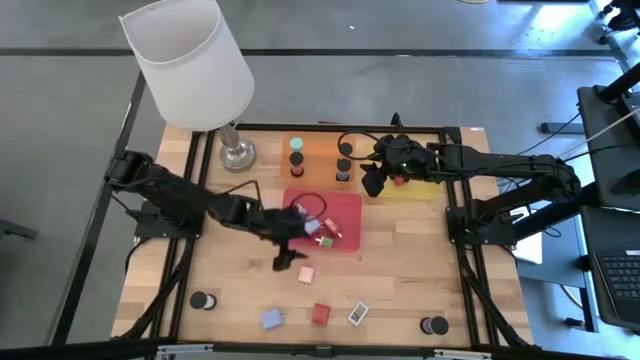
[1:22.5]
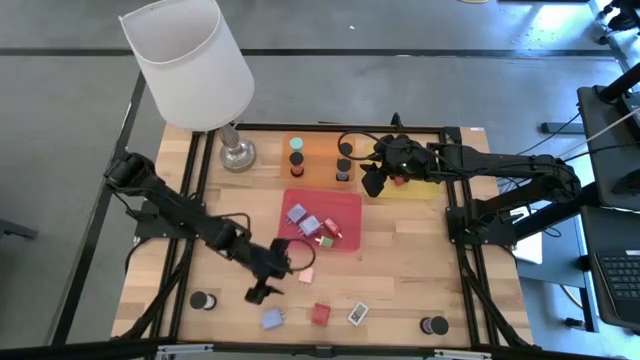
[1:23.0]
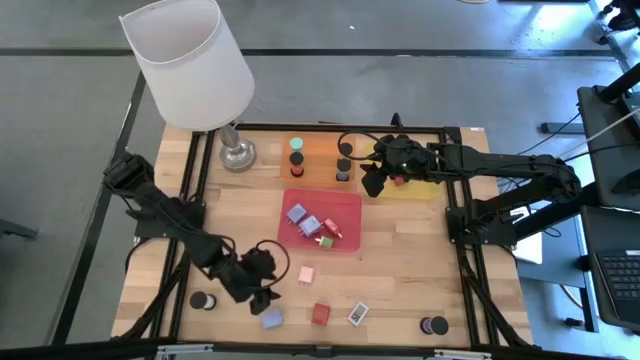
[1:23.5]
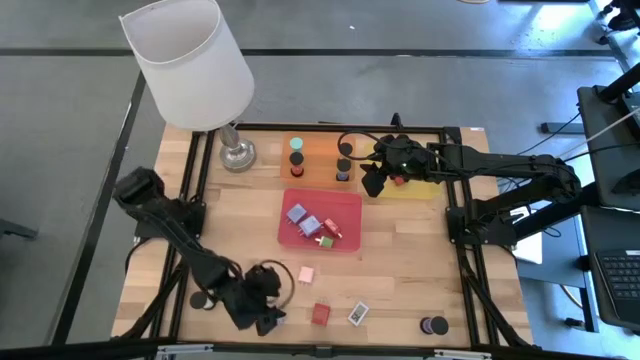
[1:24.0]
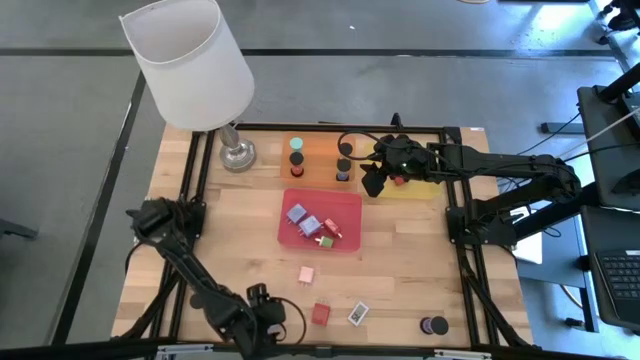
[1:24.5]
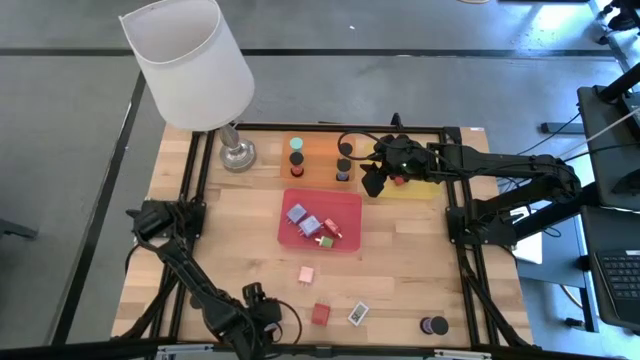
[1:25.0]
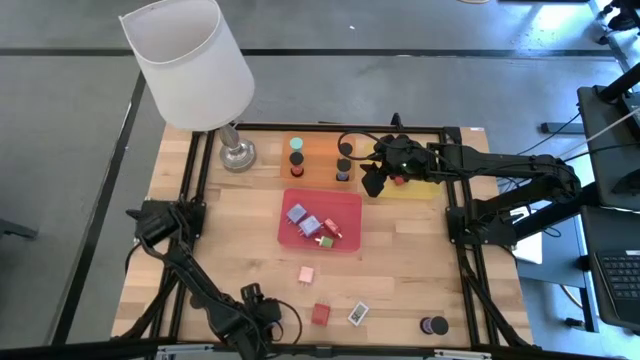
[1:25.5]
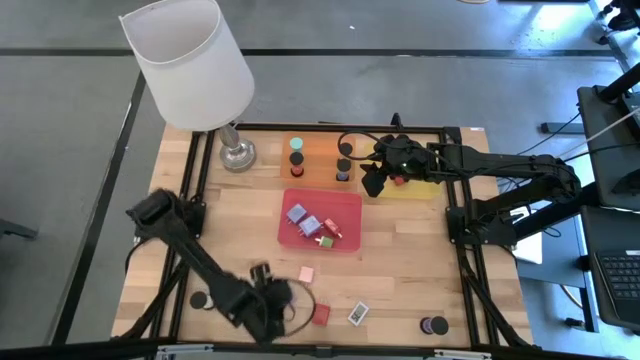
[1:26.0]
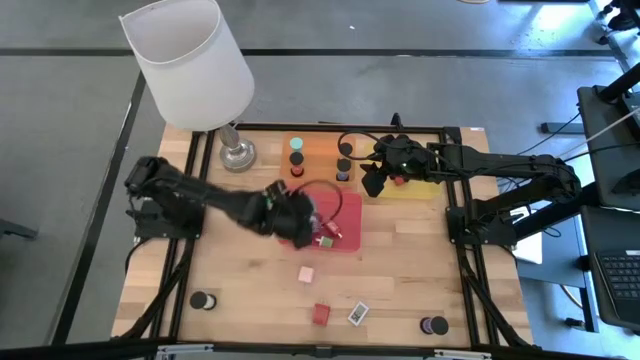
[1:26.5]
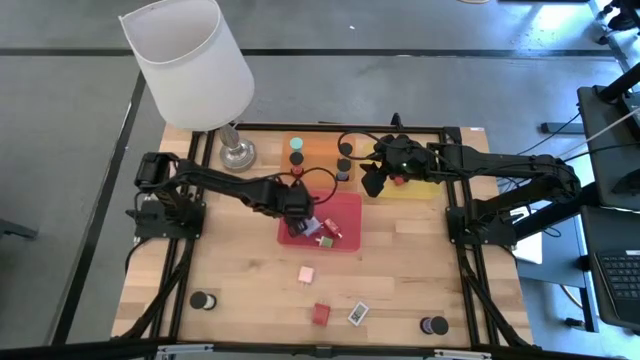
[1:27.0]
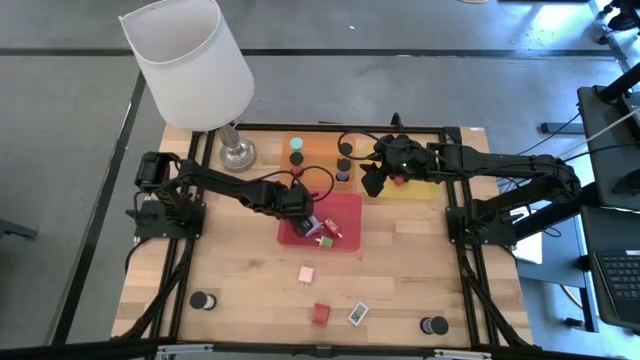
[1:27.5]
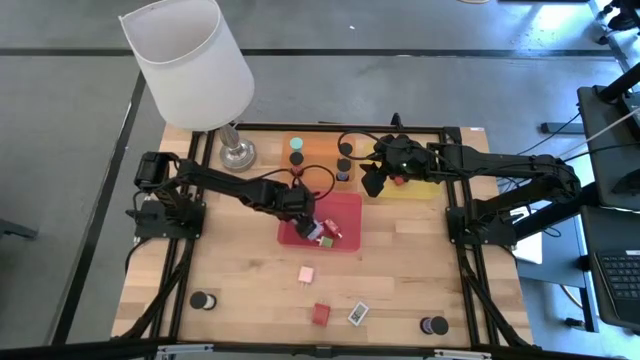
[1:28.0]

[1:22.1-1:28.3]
Task: Pick & Place Office items
Put the light blue charger adapter into the red bin

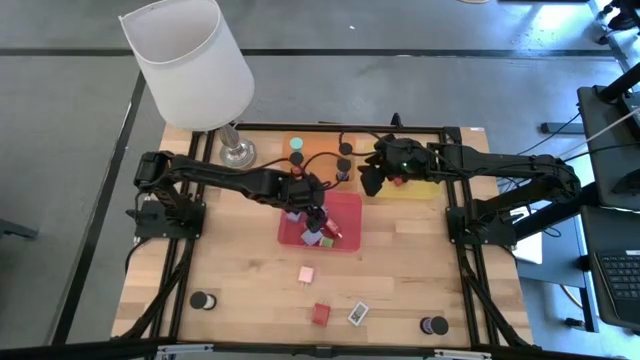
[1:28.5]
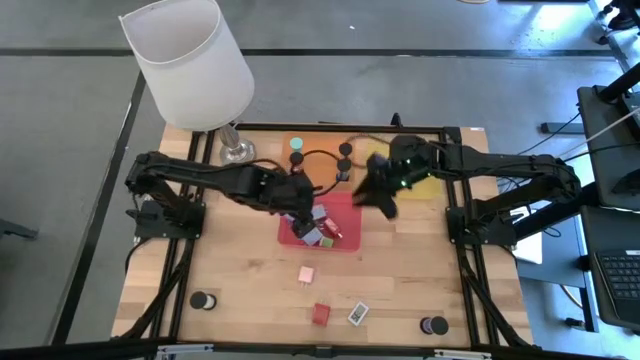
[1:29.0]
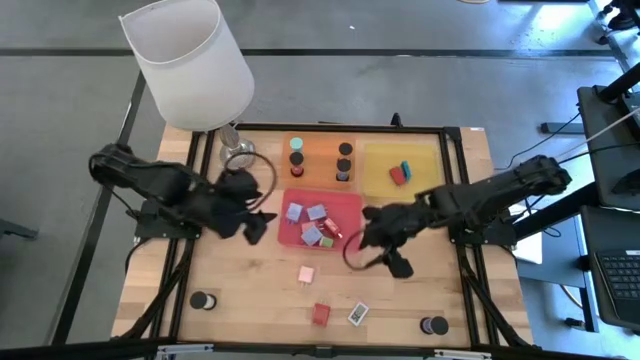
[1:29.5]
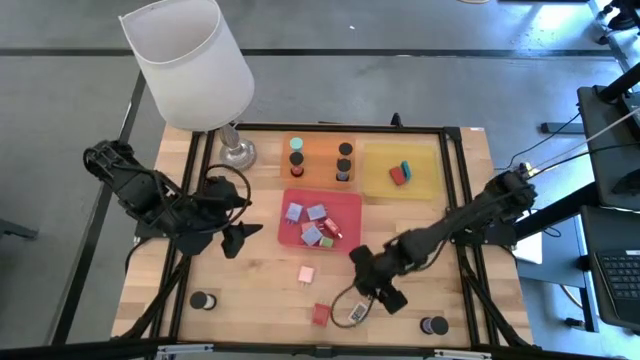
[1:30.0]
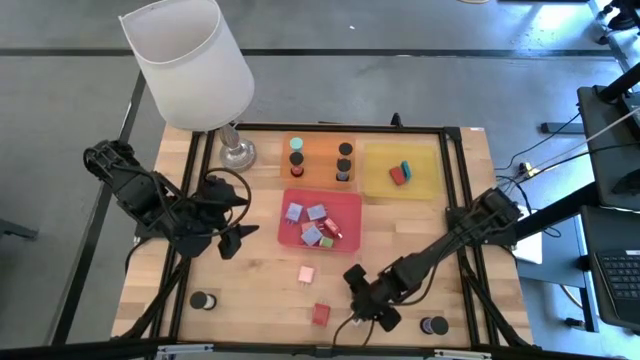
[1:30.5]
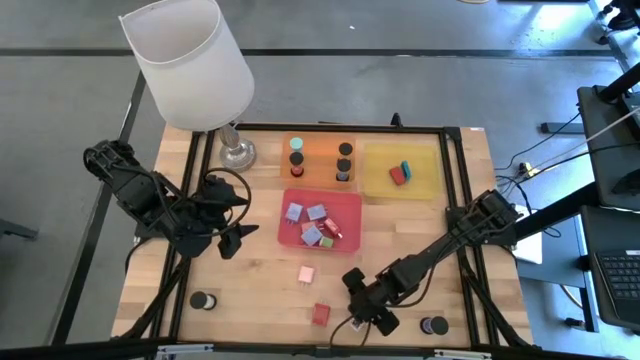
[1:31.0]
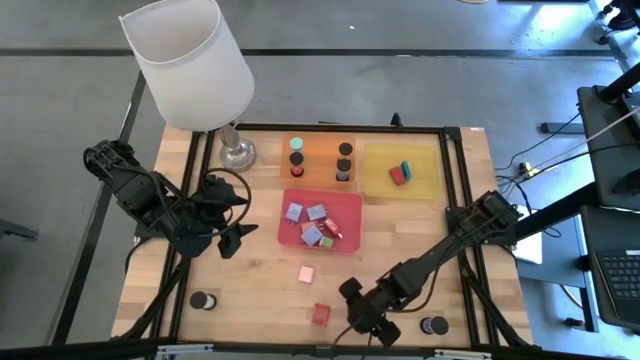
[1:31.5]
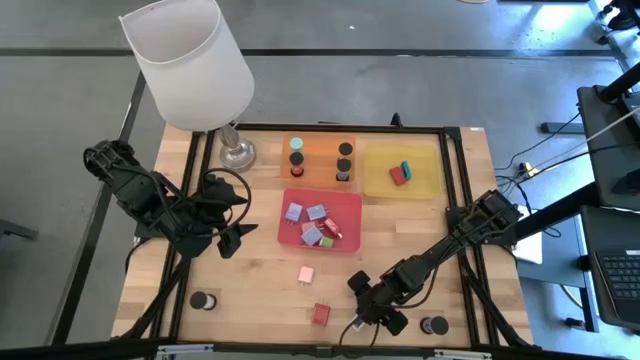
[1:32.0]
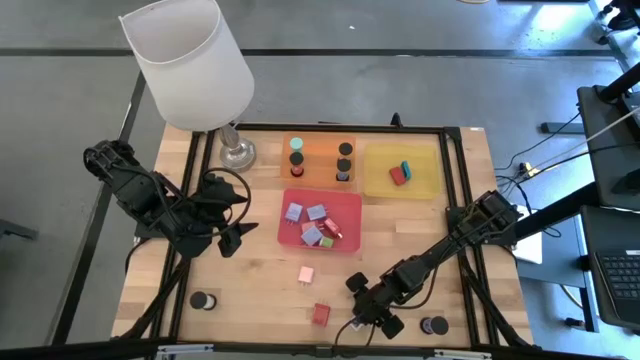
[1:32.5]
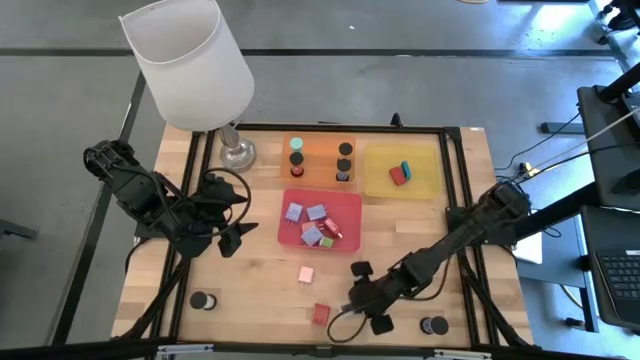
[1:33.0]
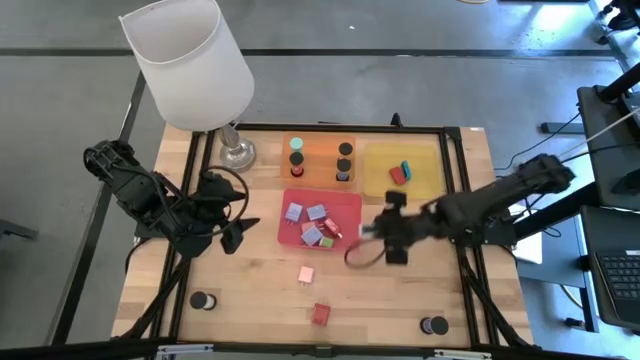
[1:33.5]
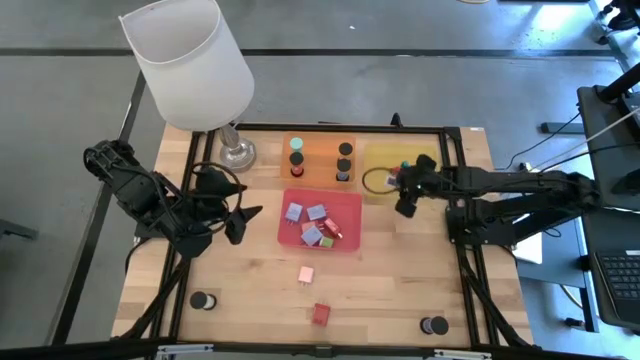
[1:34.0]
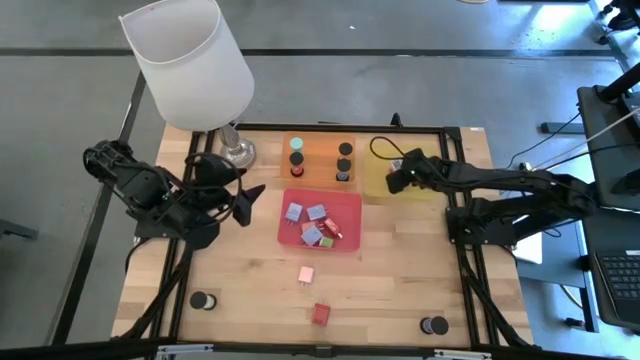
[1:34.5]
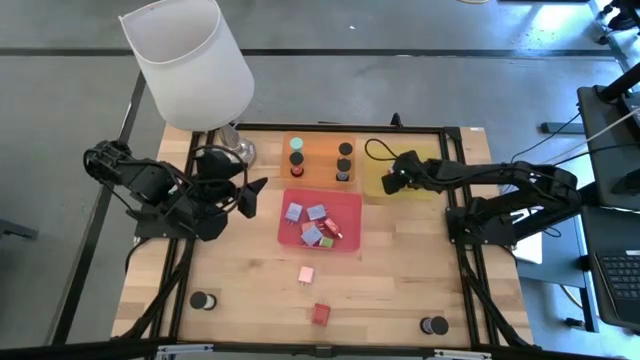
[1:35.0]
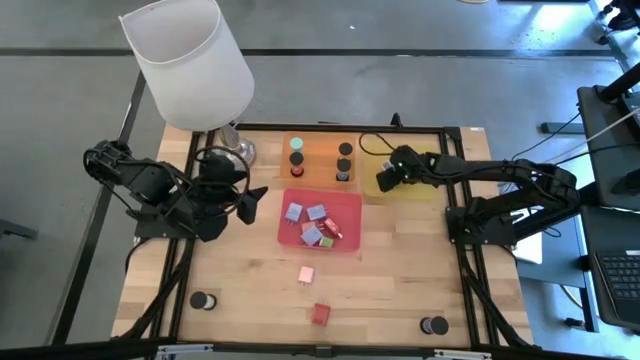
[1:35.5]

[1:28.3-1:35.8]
Put the white digital clock into the yellow bin

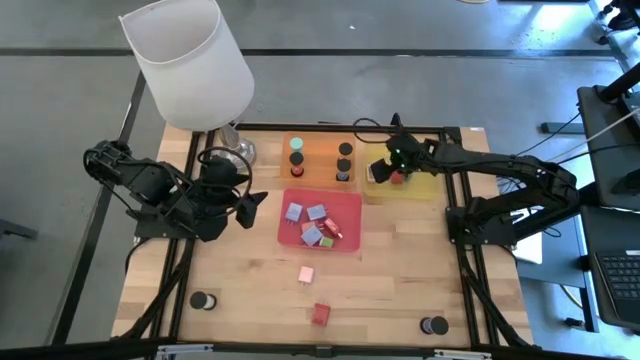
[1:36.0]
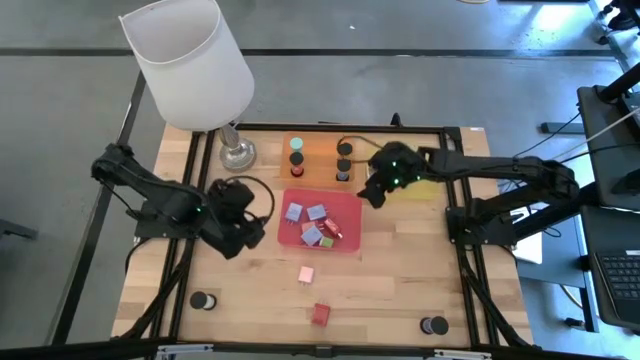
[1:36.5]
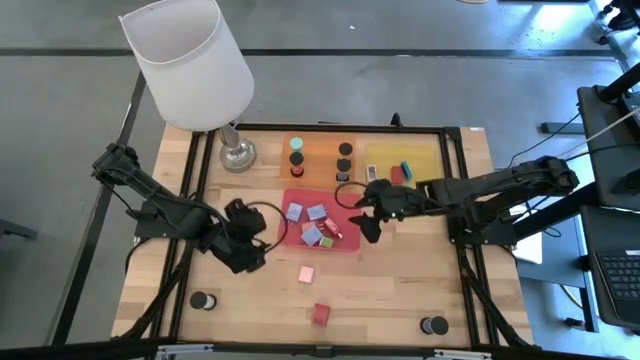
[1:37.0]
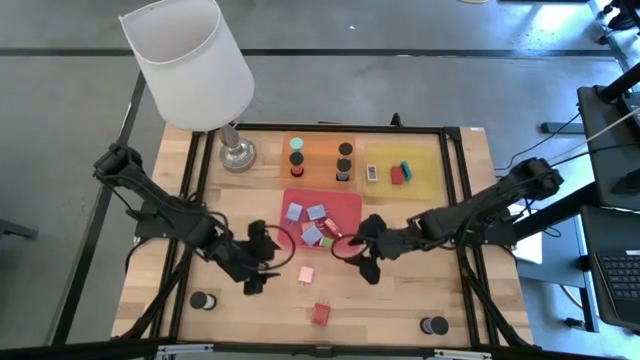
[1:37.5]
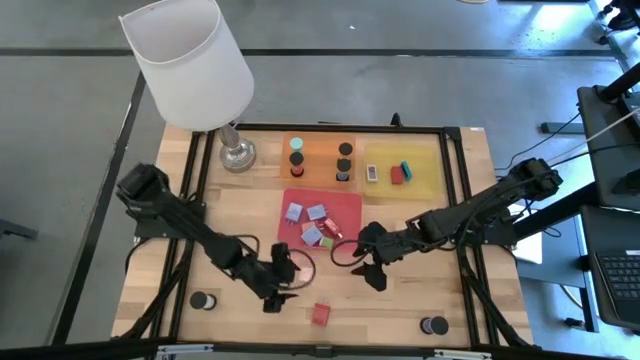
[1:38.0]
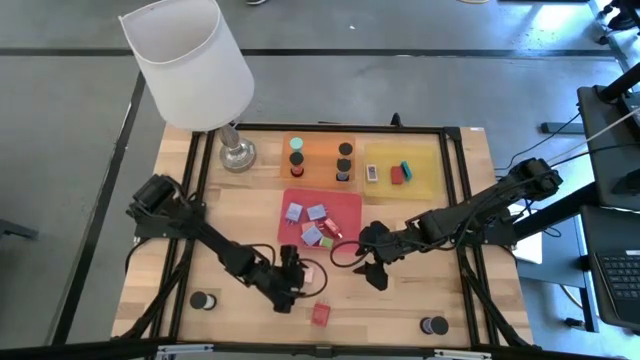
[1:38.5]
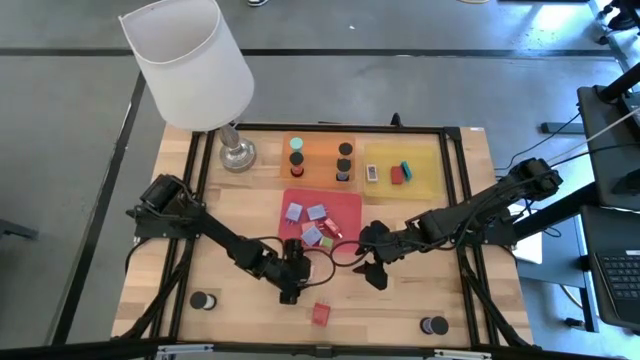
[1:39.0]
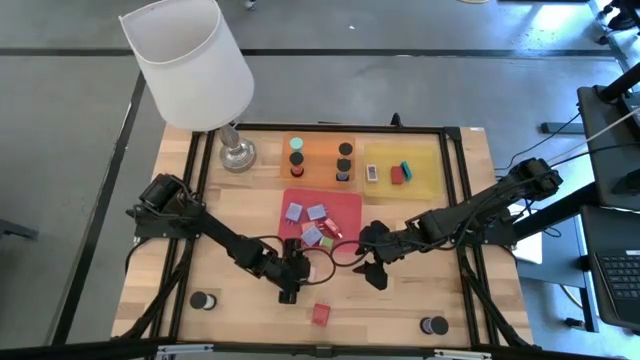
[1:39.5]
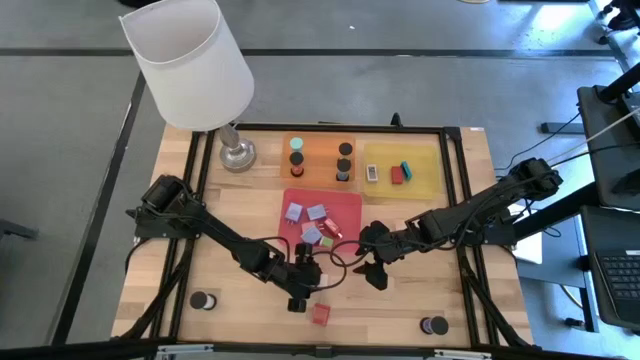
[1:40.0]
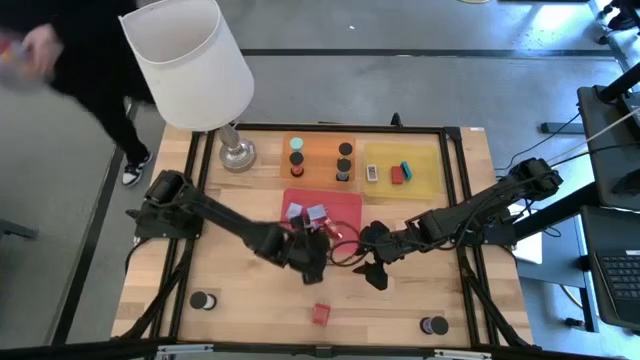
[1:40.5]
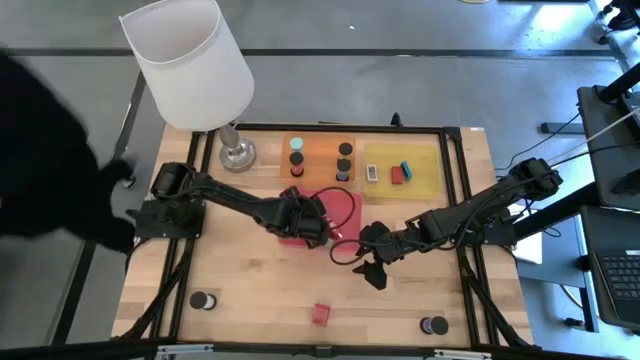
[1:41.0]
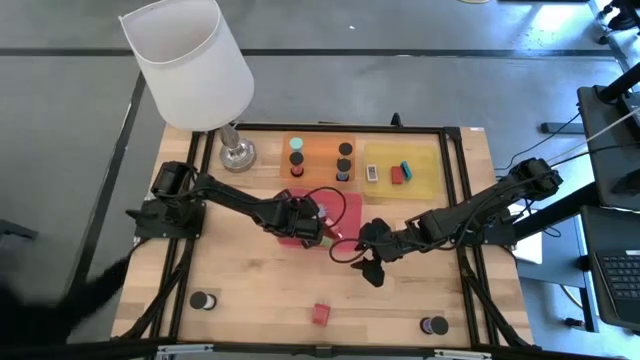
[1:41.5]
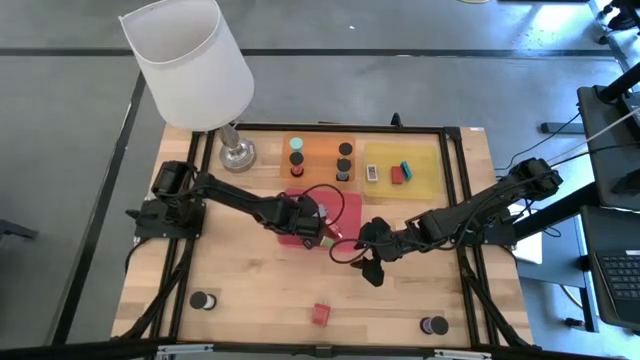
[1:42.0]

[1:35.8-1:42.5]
Put the white charger adapter into the red bin
